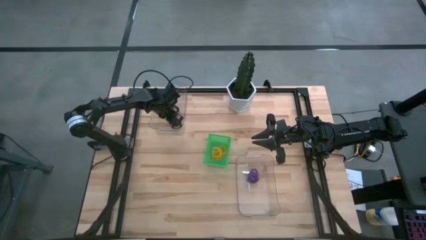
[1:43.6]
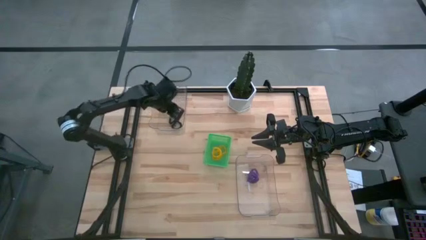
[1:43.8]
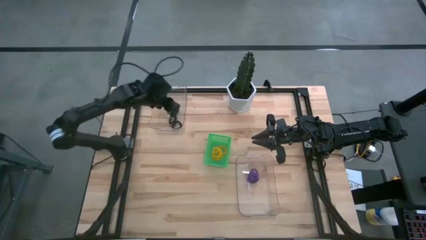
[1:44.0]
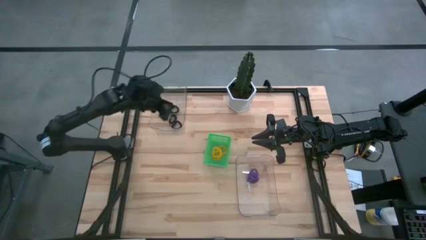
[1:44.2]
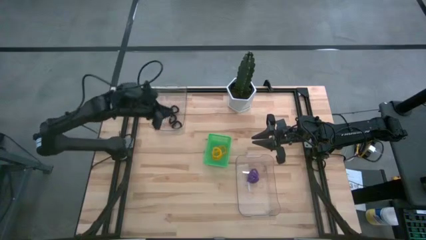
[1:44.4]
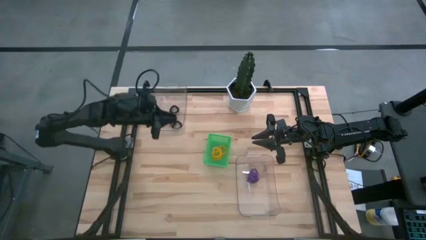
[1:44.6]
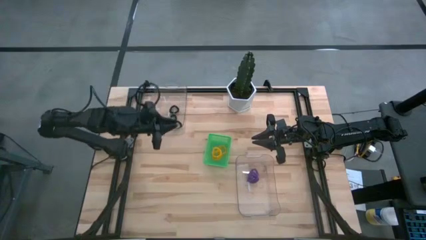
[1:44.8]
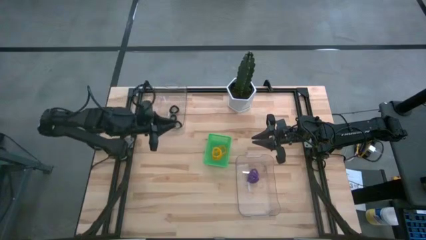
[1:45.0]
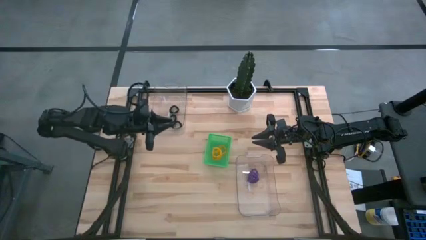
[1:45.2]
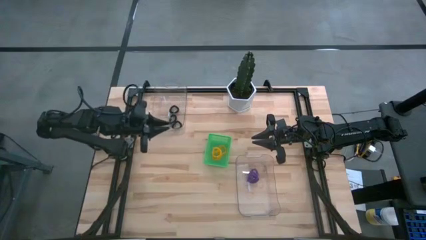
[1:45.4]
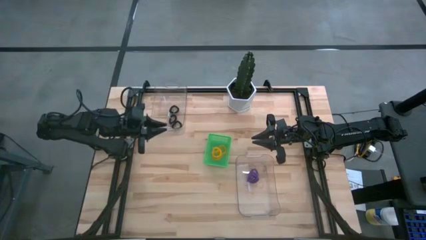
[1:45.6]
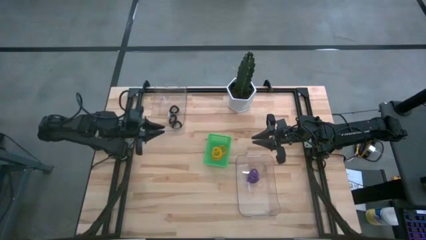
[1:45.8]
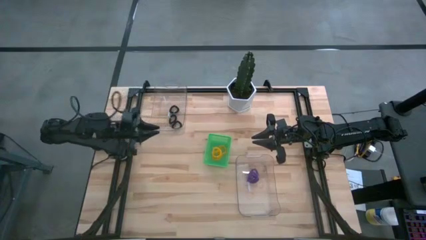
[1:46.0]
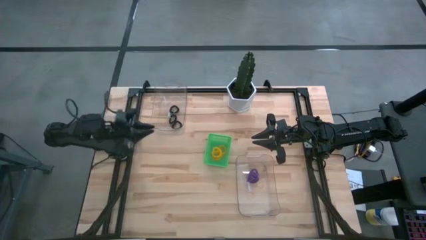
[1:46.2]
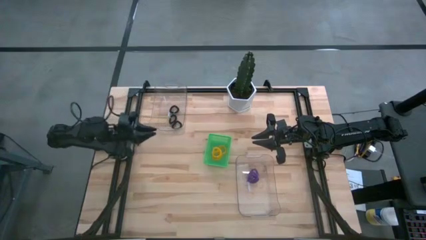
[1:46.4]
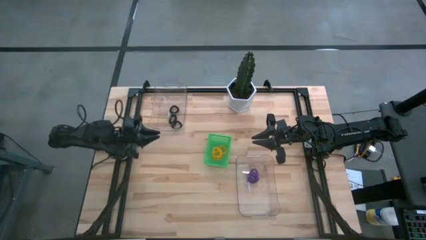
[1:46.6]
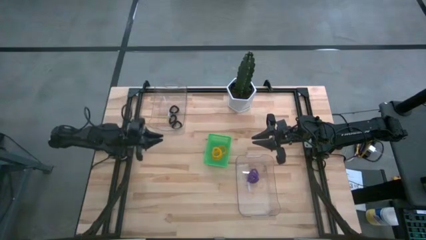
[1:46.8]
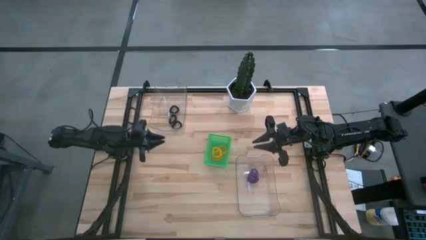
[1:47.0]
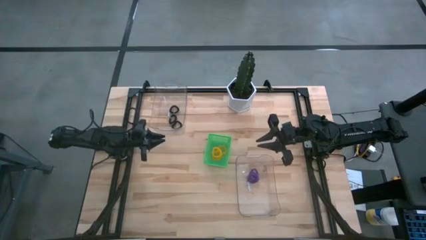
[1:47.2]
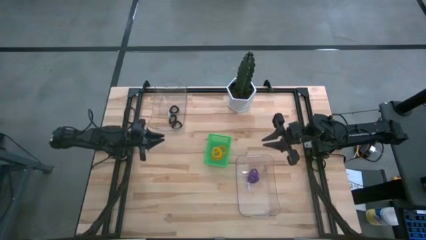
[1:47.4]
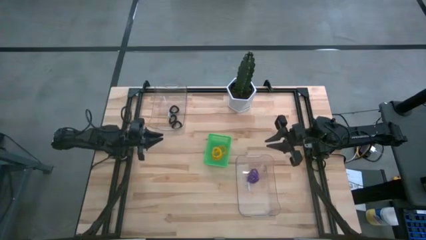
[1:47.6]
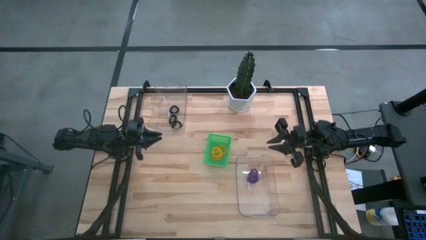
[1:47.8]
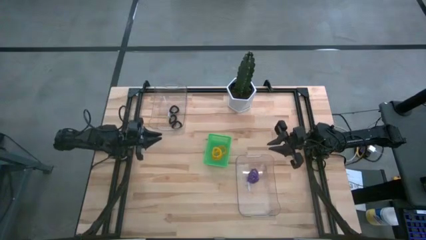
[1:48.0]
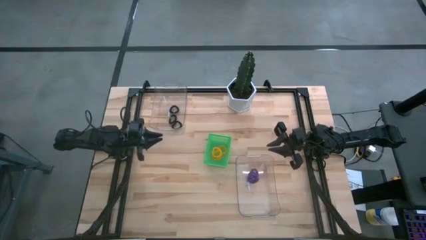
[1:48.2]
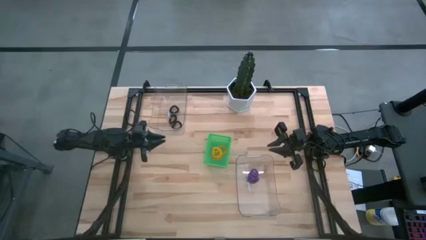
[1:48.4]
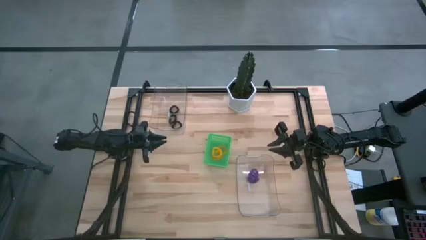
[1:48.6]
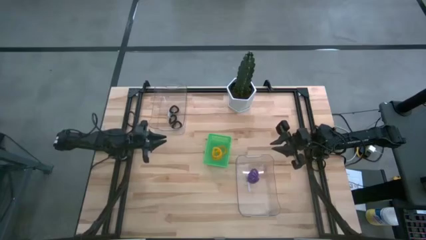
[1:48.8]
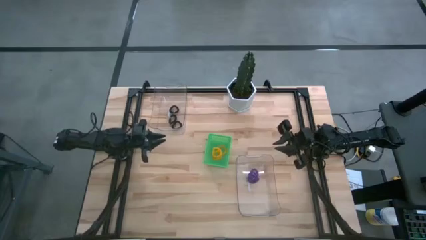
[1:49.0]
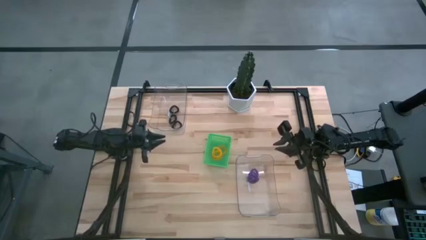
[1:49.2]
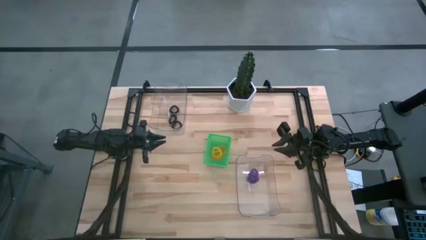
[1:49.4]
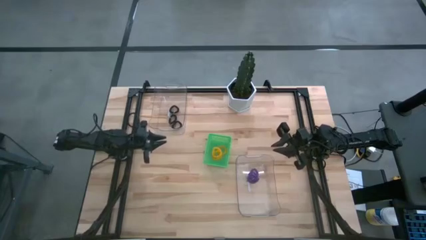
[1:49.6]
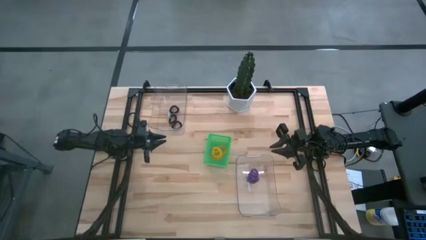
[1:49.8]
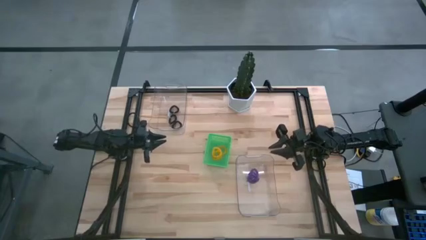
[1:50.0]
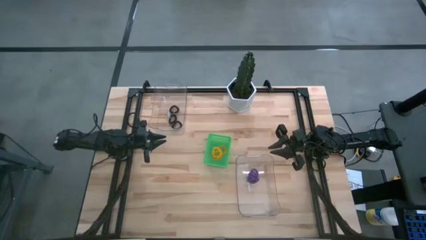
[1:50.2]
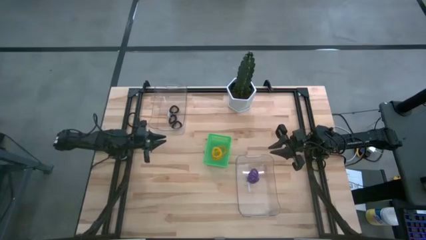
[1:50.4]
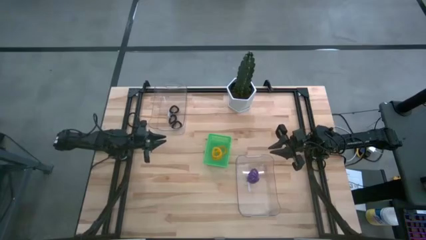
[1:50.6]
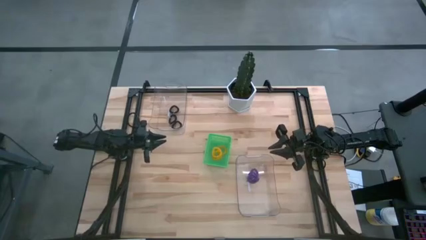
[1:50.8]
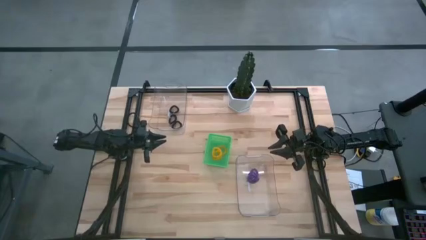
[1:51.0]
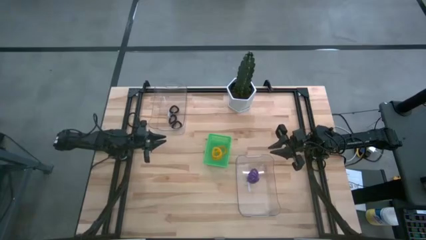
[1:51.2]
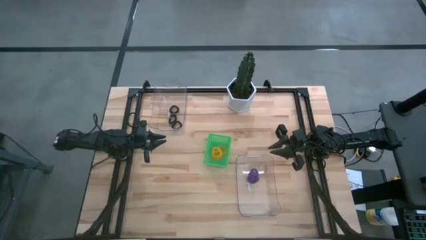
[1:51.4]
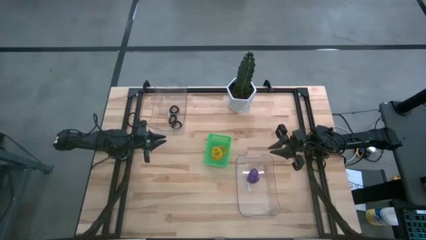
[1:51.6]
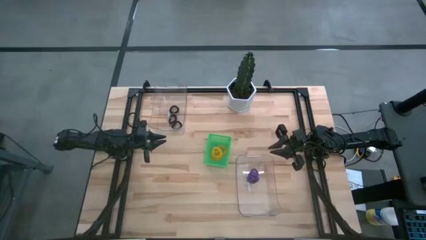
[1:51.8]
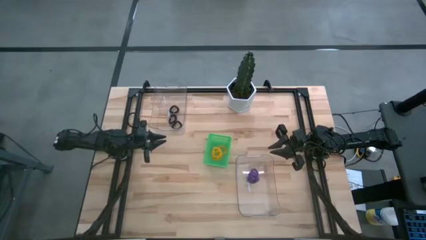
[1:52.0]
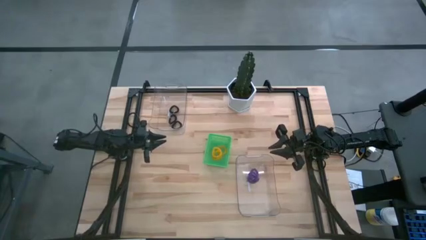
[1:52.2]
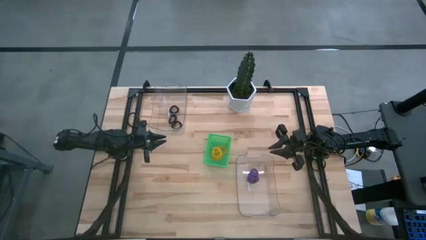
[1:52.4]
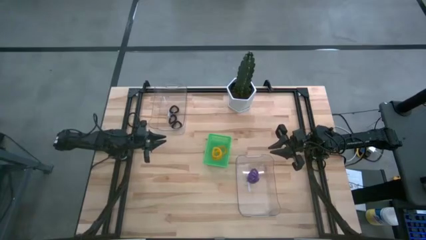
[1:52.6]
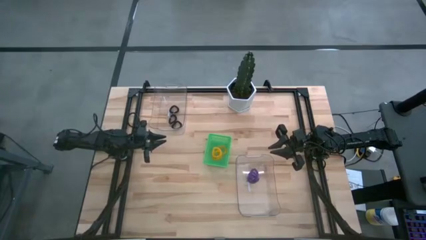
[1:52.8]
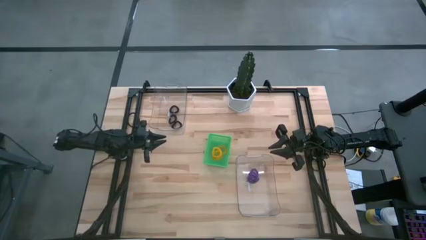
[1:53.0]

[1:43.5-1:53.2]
Task: Sort spring keychains
Return to Home Position

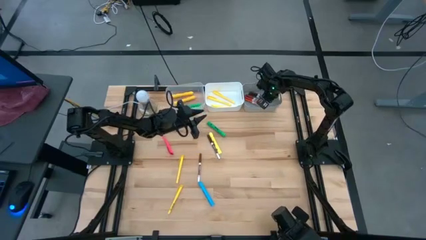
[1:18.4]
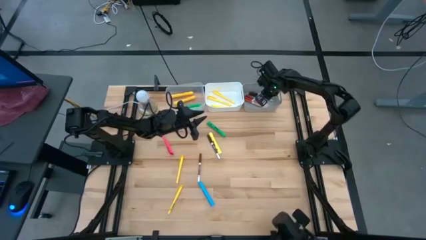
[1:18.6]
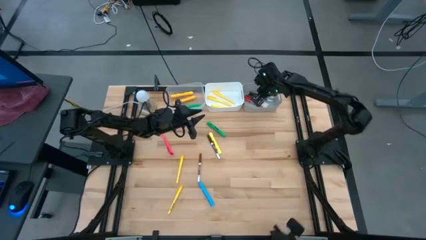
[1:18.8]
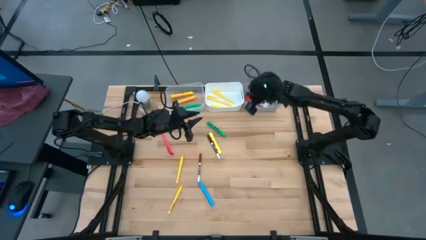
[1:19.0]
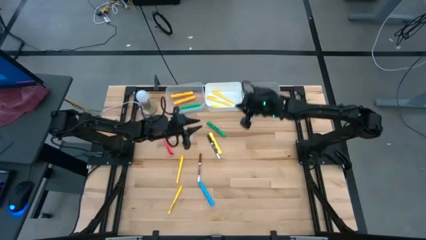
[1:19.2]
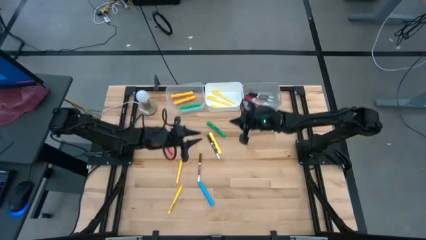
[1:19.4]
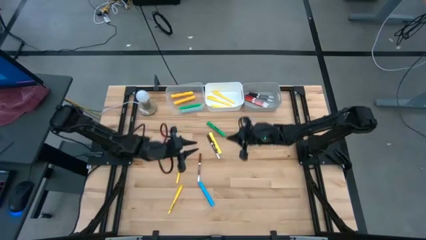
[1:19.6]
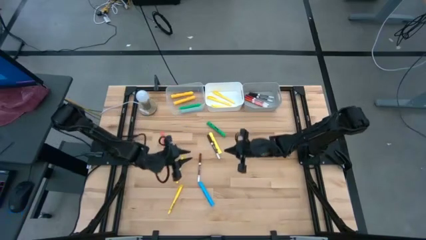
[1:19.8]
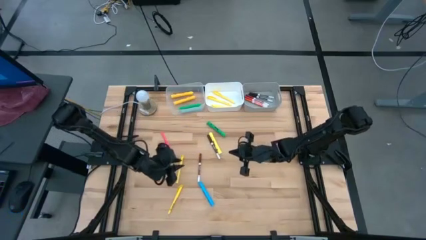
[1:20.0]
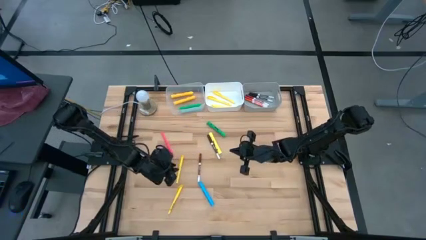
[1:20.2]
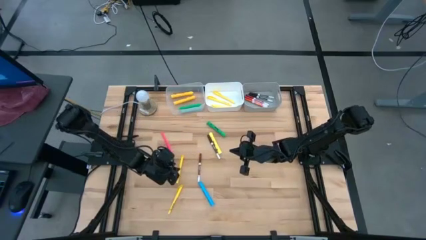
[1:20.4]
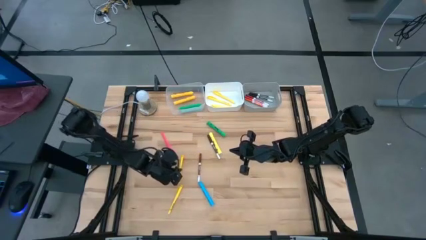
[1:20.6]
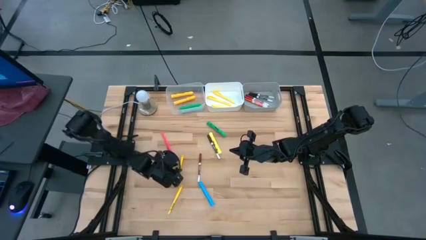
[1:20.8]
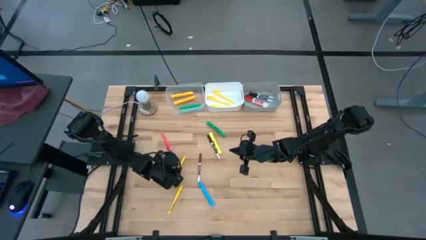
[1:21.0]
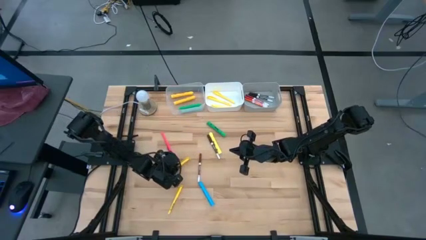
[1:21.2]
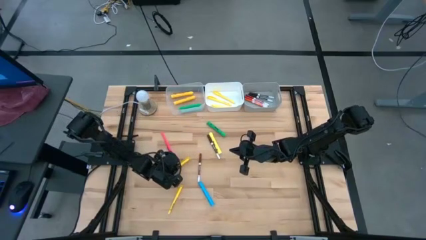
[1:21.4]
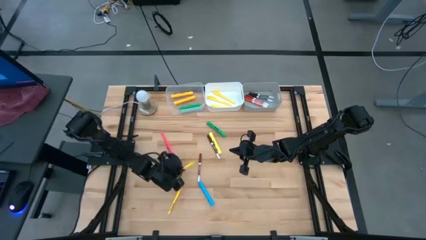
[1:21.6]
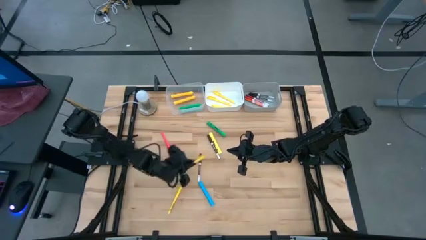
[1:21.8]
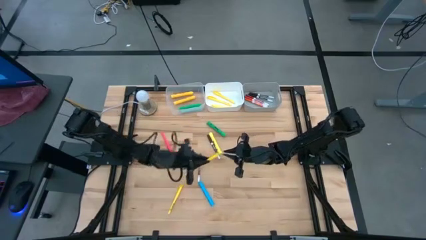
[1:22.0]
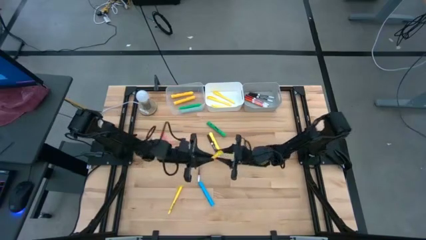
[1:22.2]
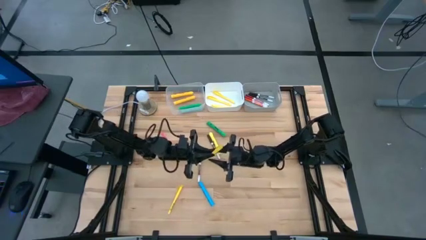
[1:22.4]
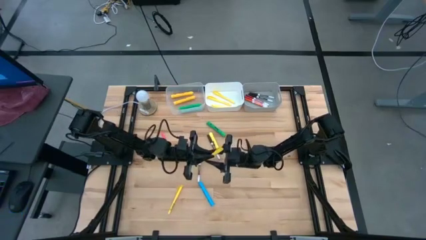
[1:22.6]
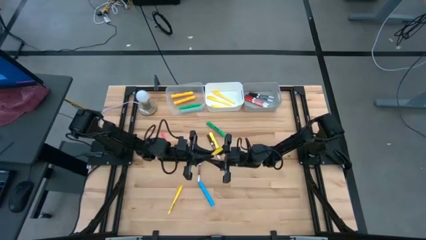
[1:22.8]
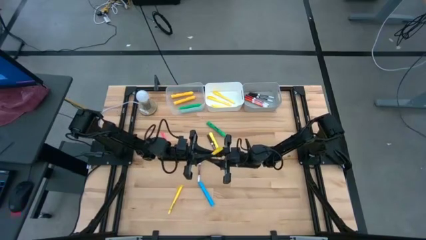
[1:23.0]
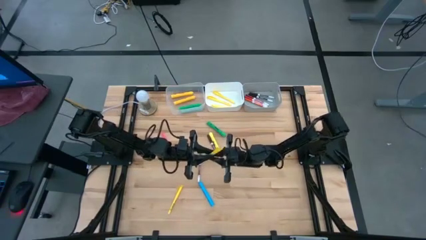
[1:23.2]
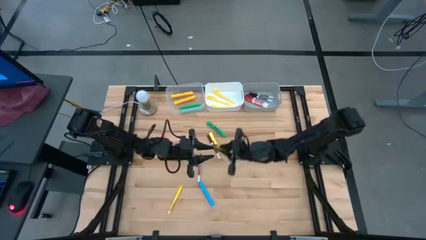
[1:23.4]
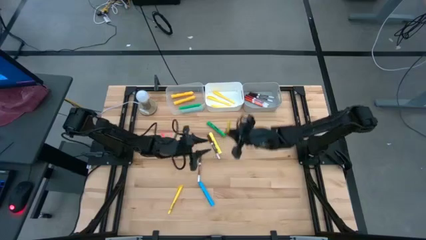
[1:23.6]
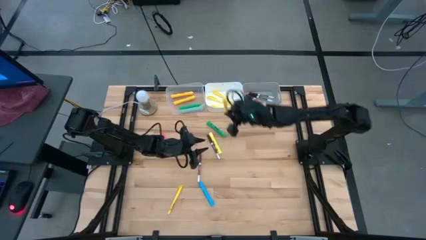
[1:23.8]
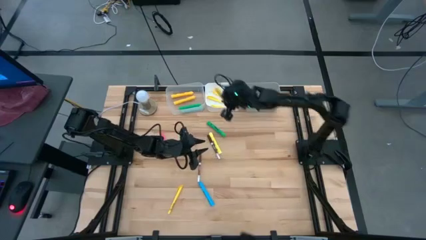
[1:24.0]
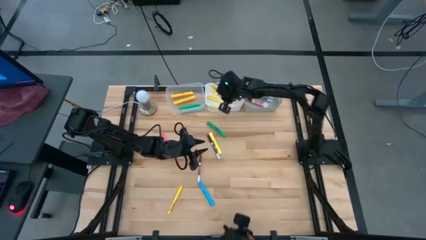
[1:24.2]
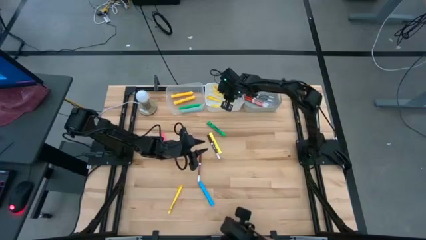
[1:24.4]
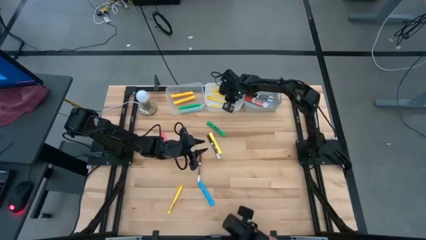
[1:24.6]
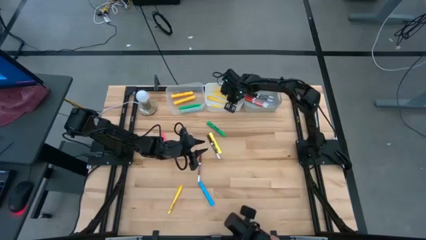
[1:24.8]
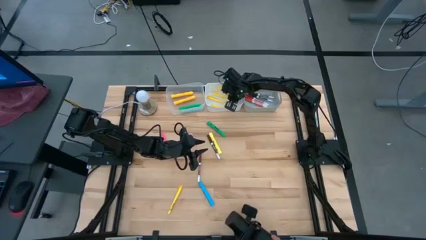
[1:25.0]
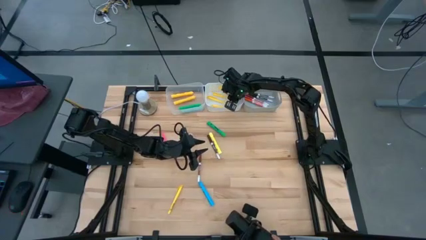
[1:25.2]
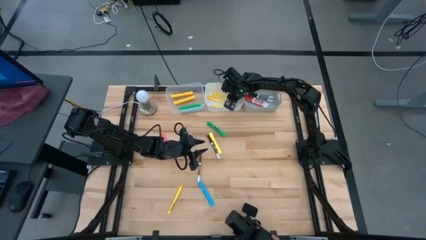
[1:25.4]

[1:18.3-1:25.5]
Task: Pick & Place Markers
Put the yellow pen into the white bin
